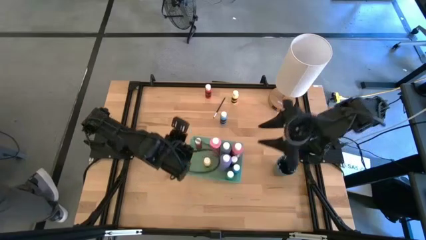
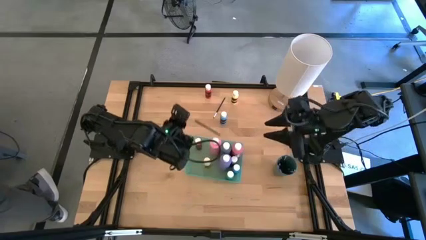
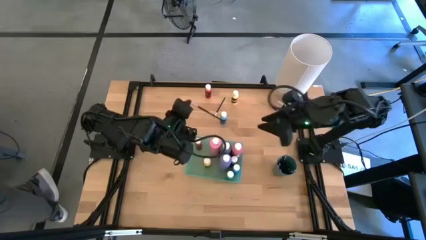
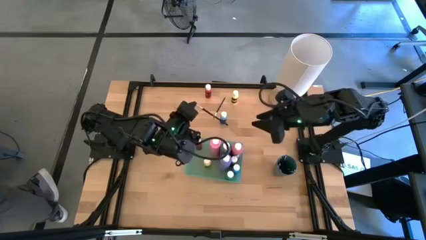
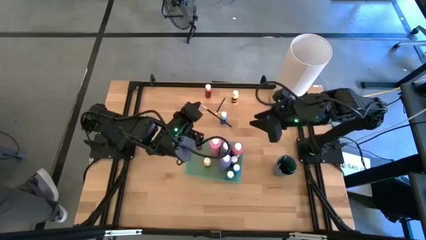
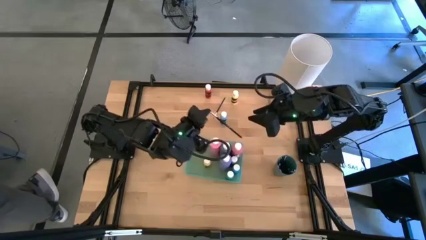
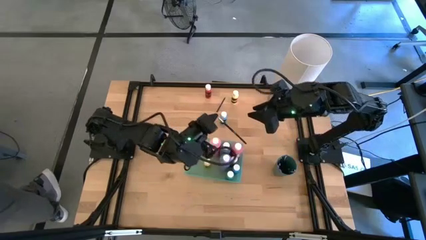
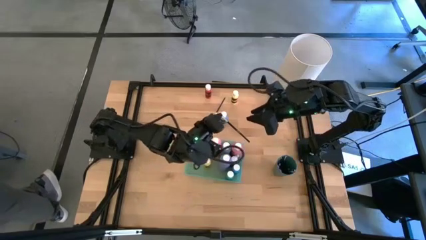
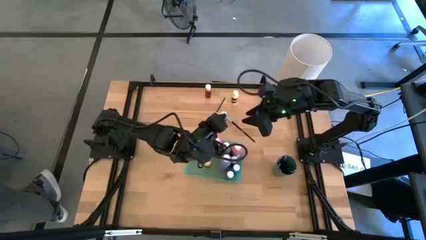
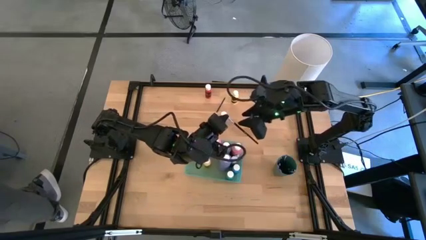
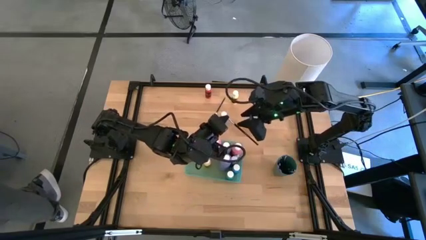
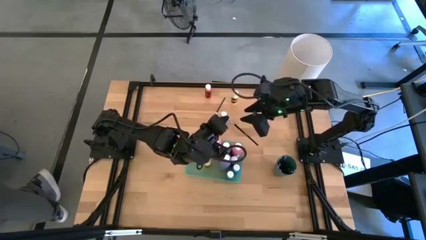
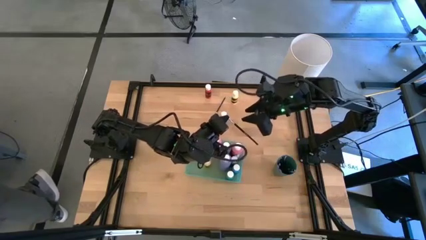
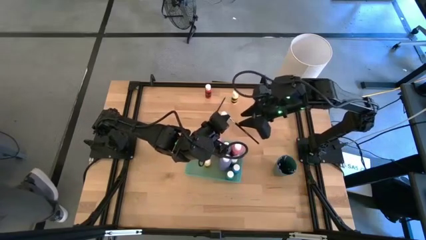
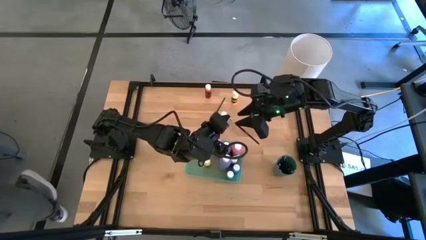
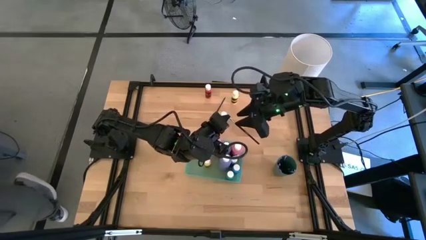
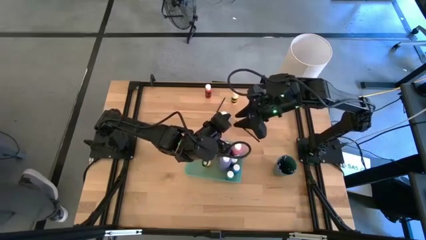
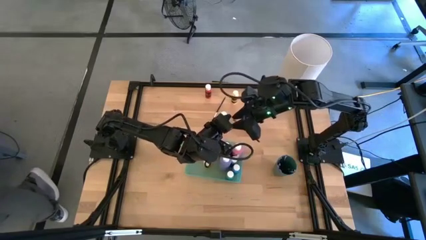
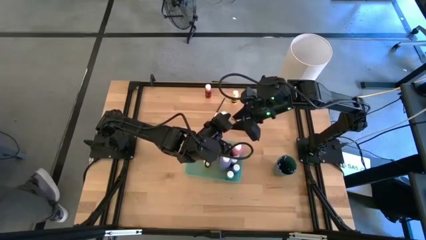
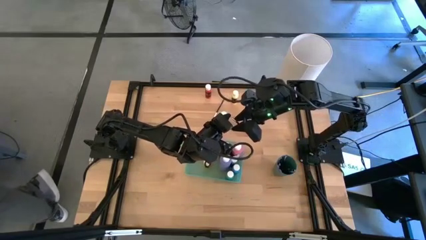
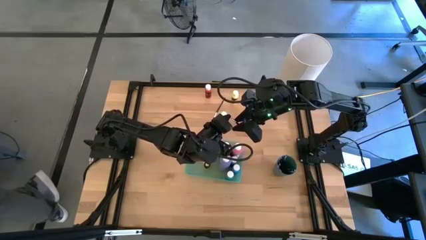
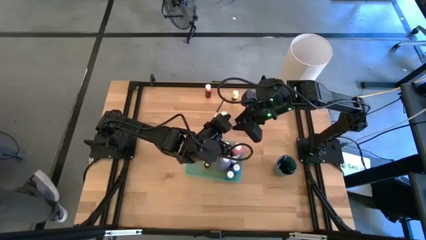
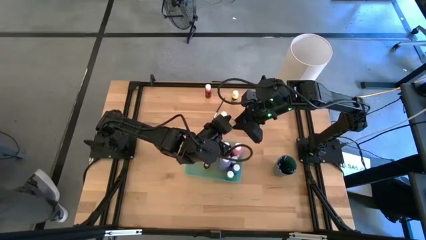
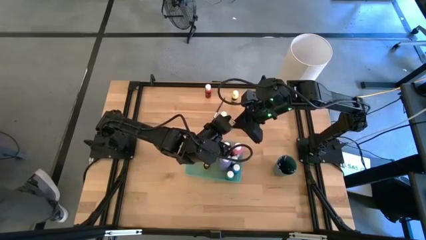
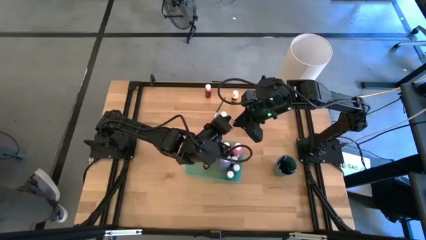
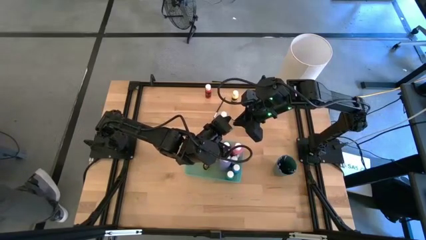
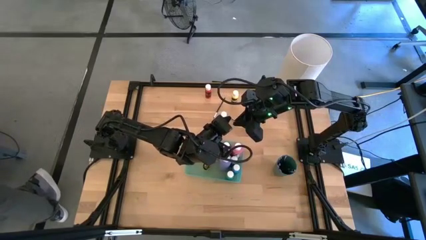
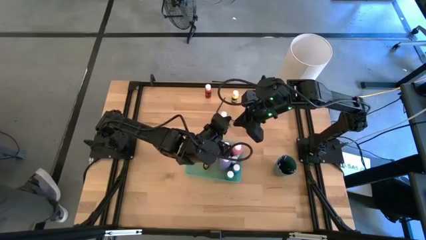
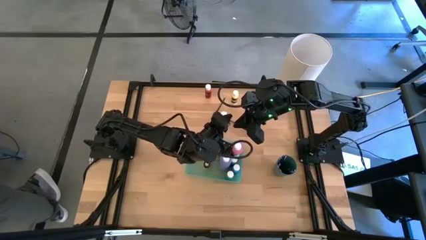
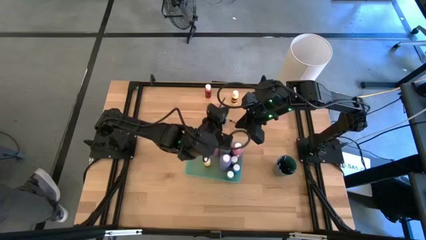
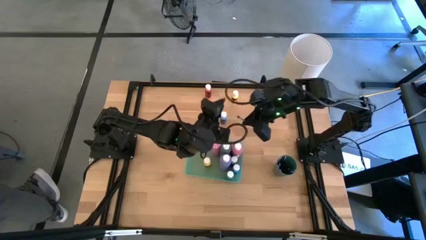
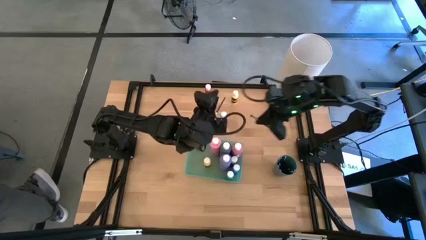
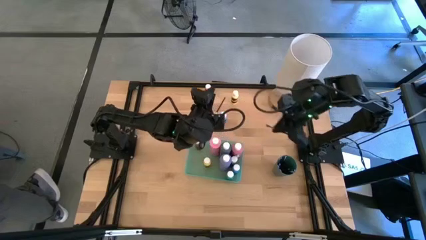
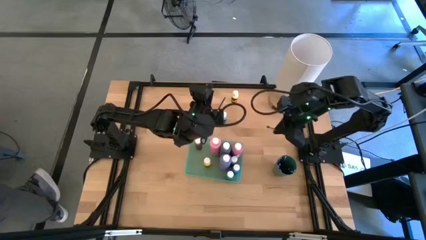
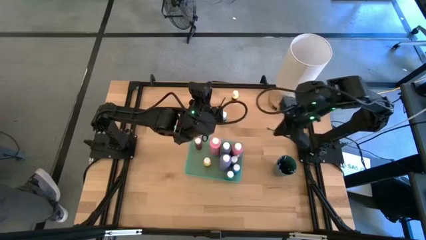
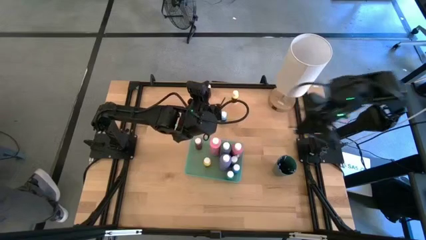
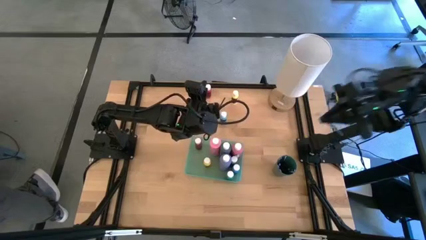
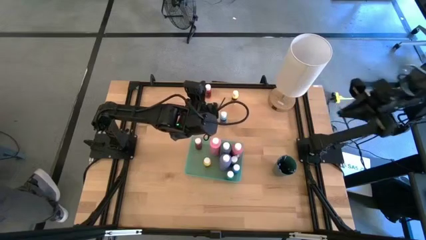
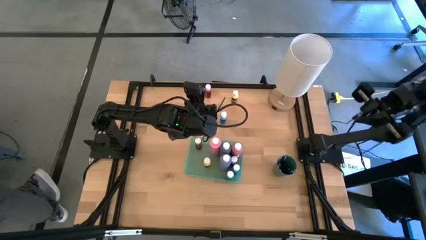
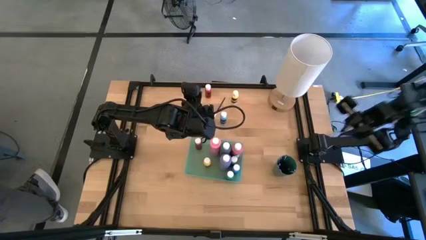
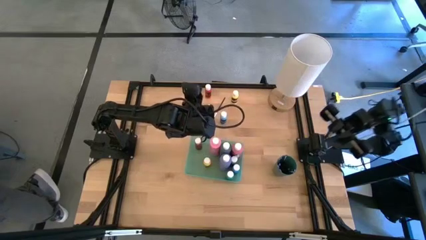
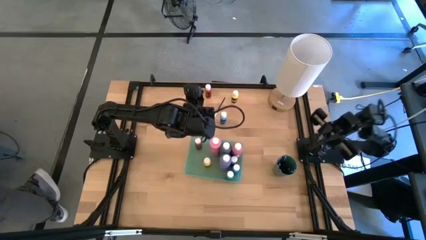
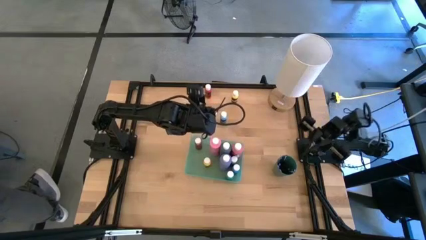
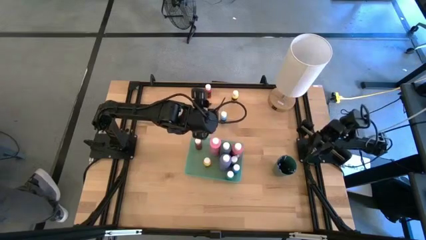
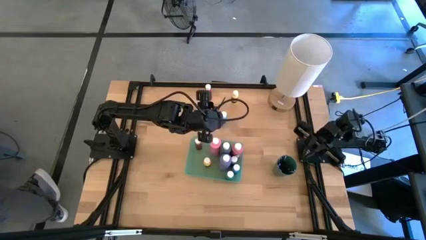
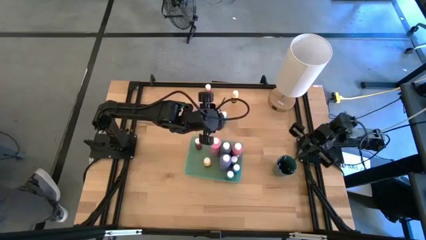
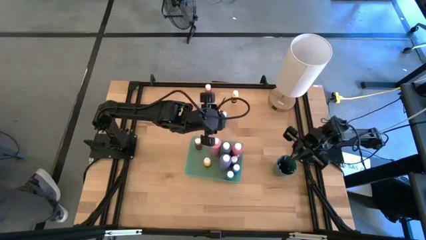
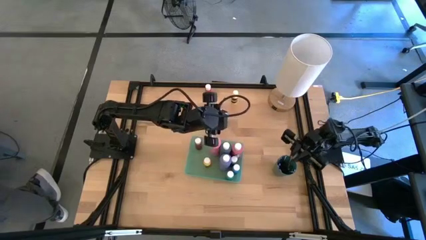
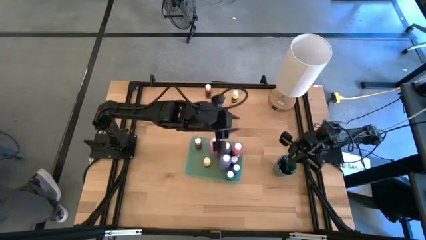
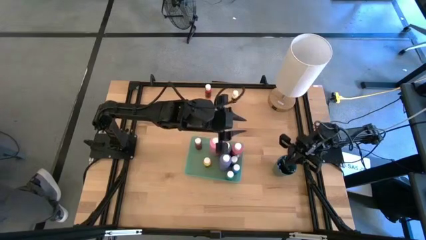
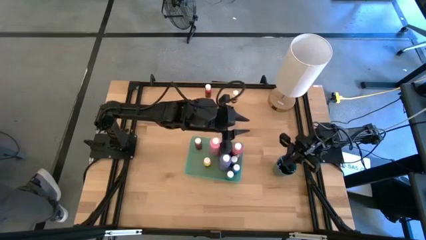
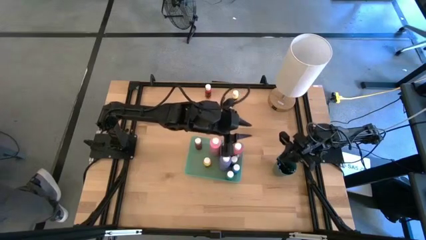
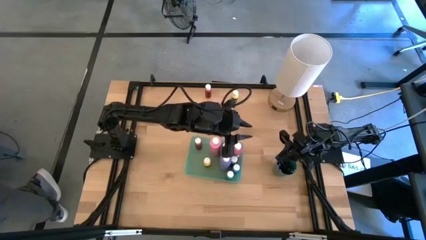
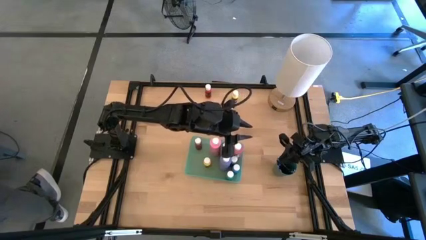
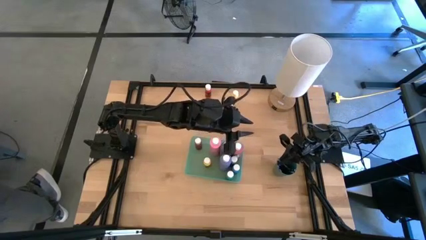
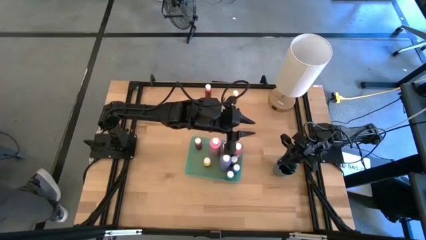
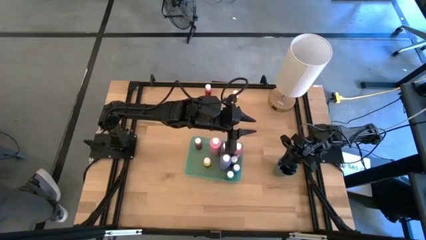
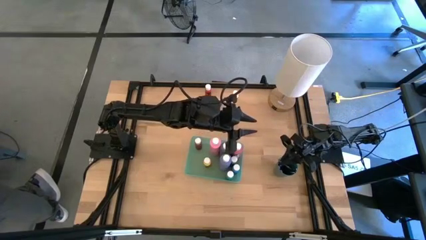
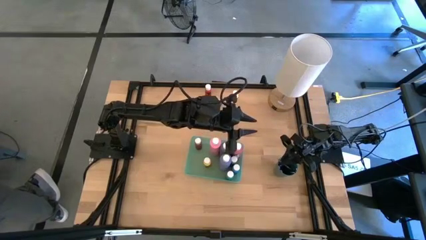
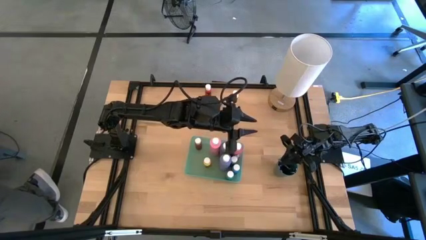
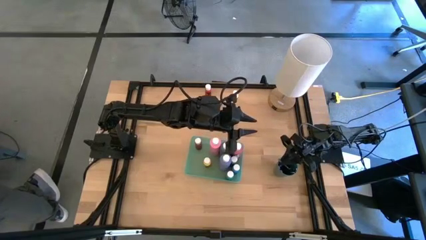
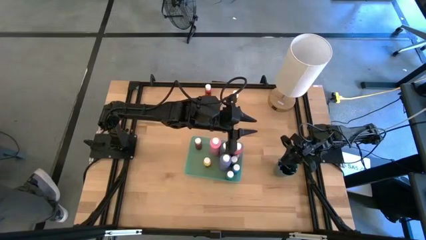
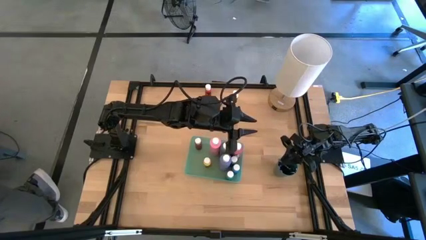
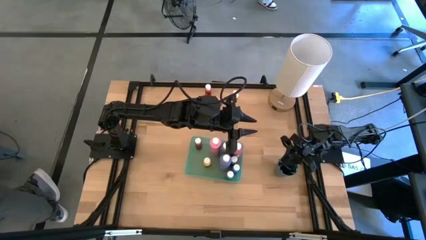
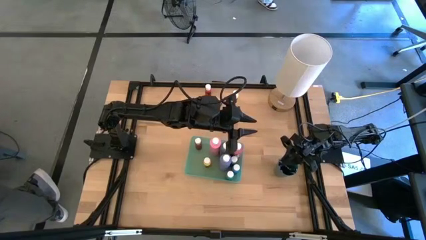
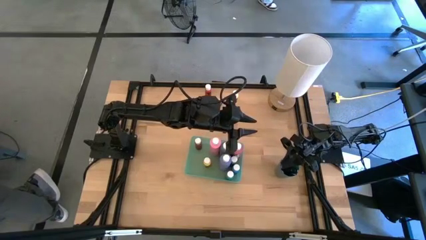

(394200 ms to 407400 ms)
Task: Pick & Place Paint Supplies
Put the black eyeshadow brush into the green cup
